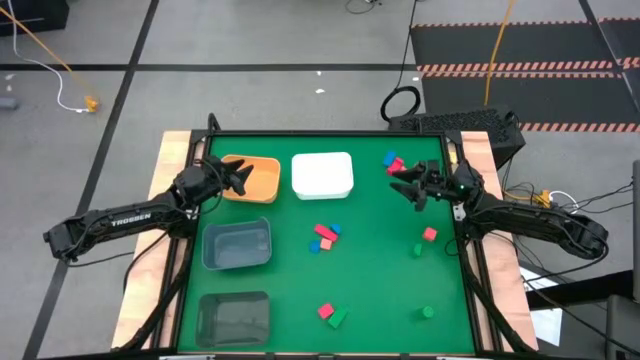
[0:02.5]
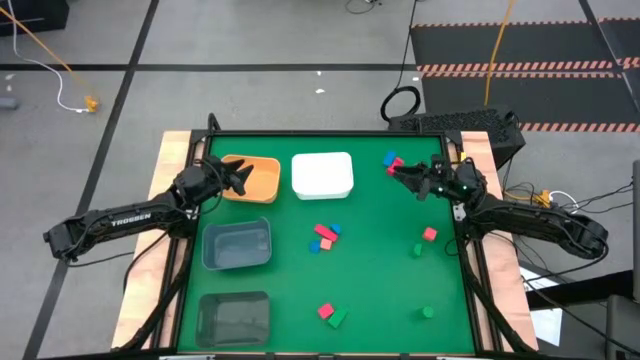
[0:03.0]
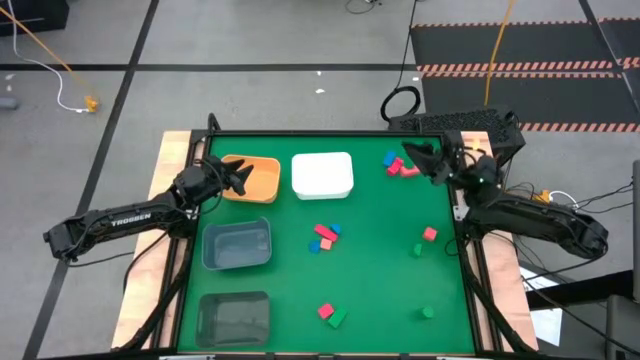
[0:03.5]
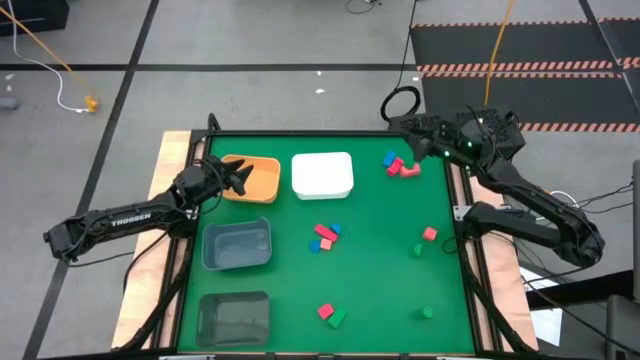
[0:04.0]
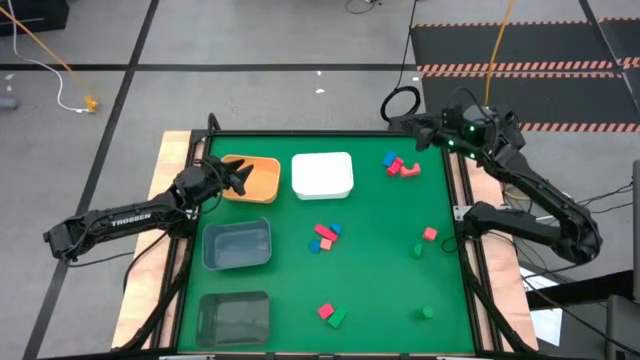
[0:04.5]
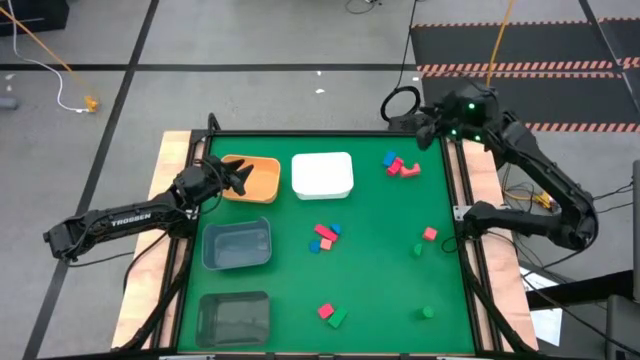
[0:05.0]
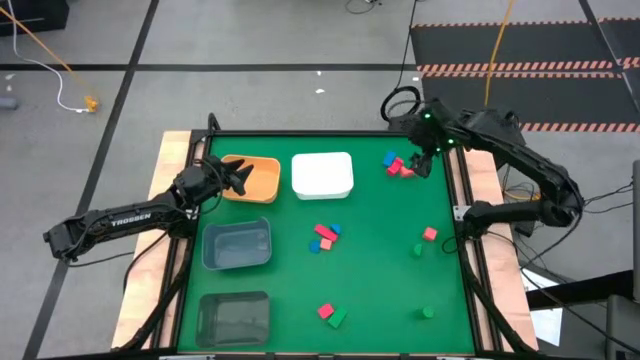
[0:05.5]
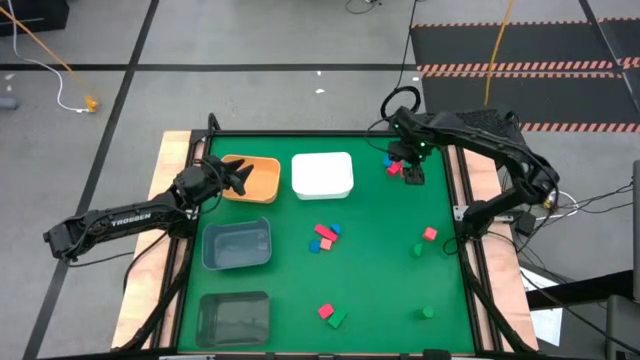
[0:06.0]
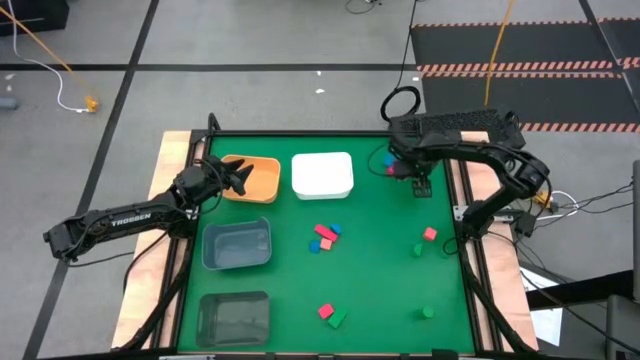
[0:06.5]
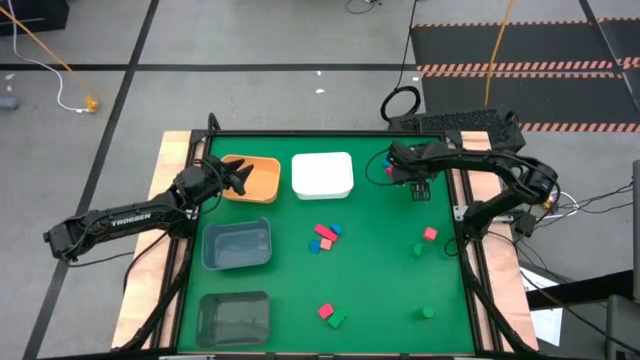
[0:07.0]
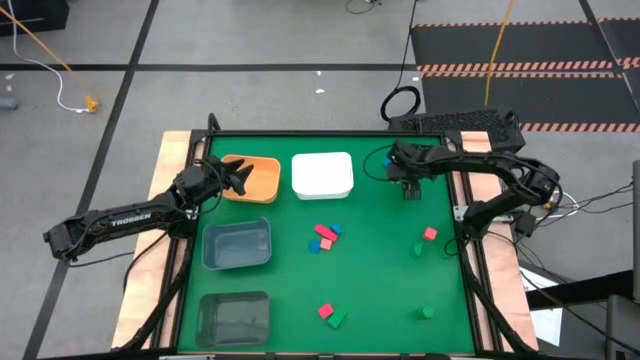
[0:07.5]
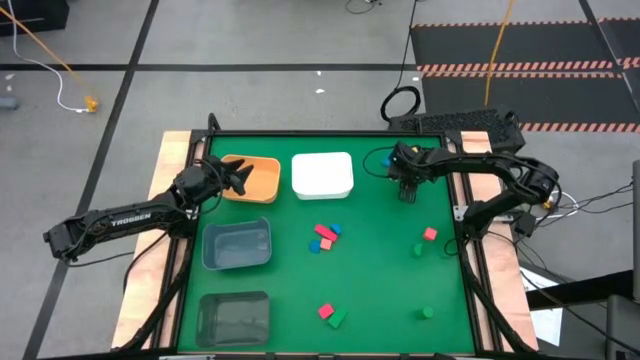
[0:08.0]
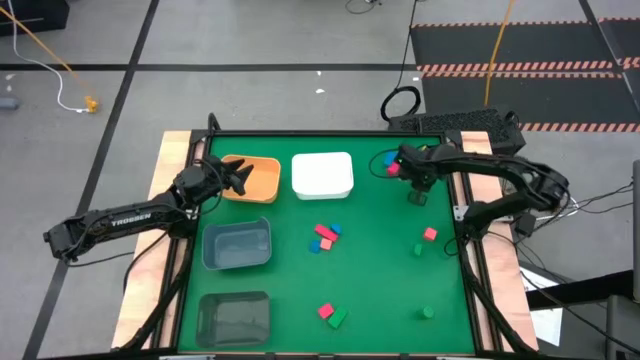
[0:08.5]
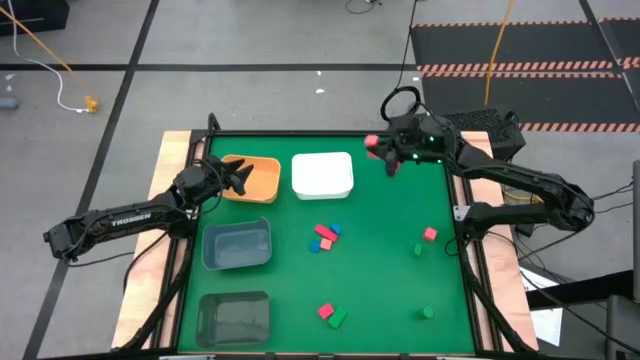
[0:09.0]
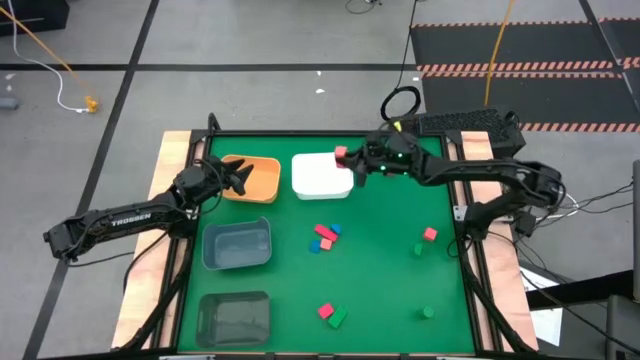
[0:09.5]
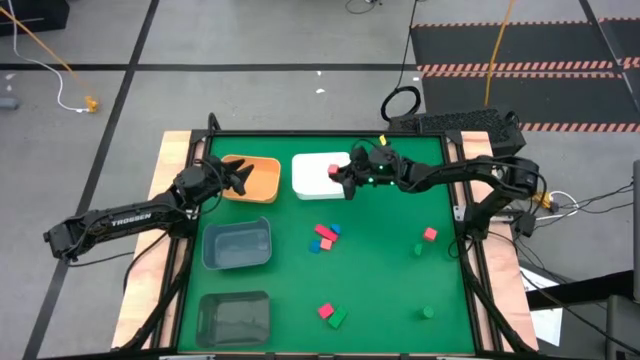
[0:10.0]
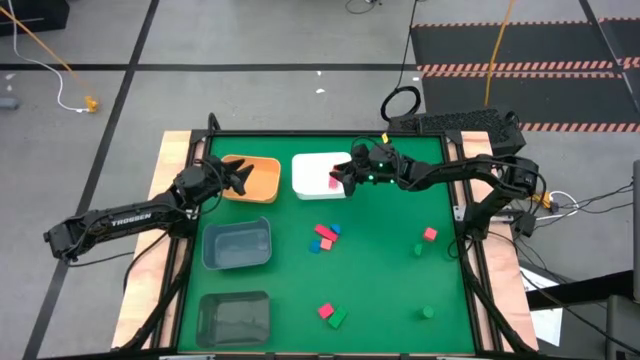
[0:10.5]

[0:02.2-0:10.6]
Task: Sort & place blocks by color
Put the top right pink block into the white bin

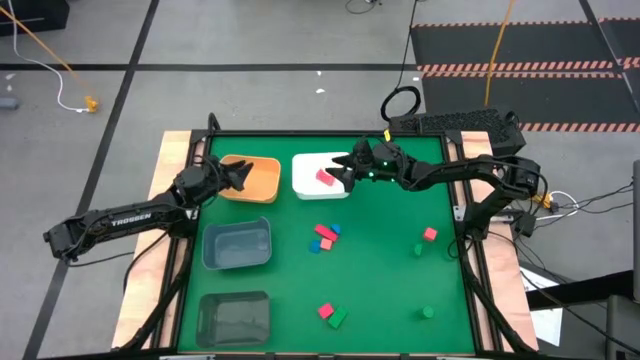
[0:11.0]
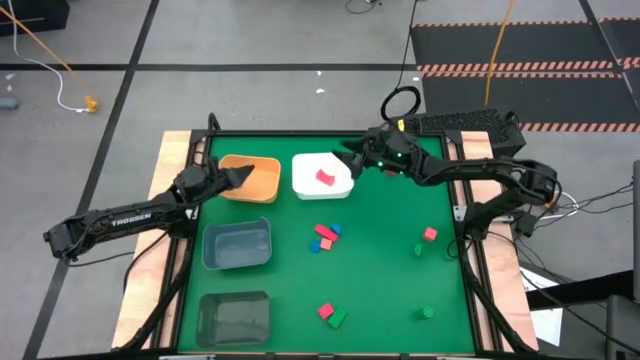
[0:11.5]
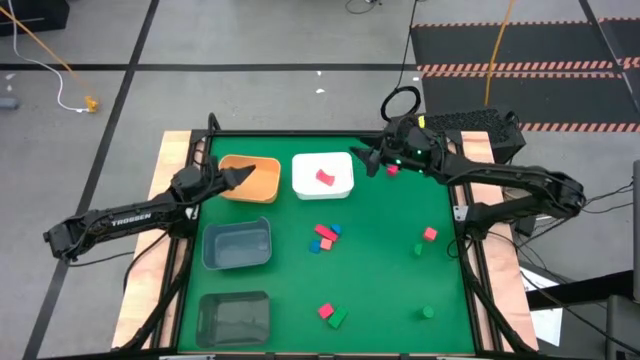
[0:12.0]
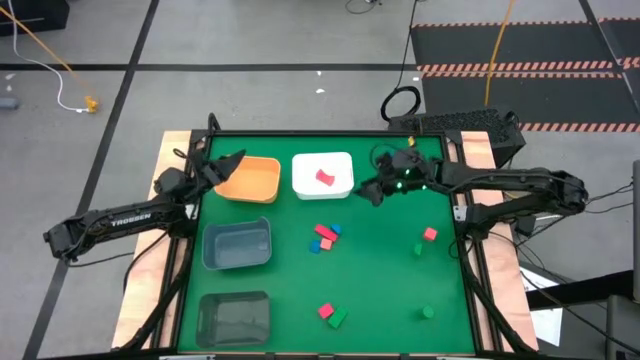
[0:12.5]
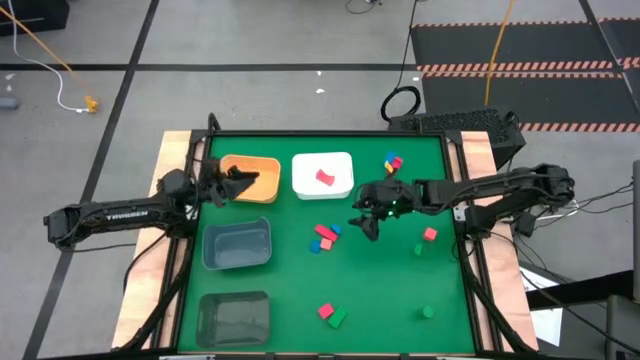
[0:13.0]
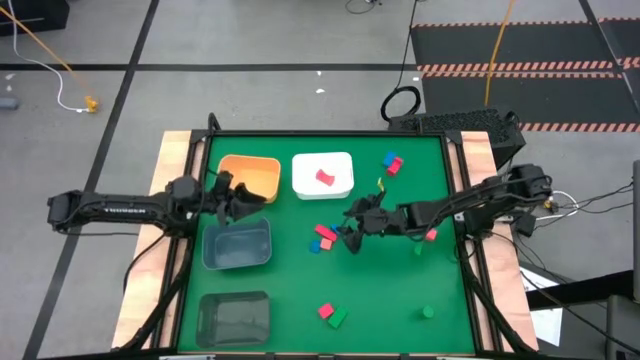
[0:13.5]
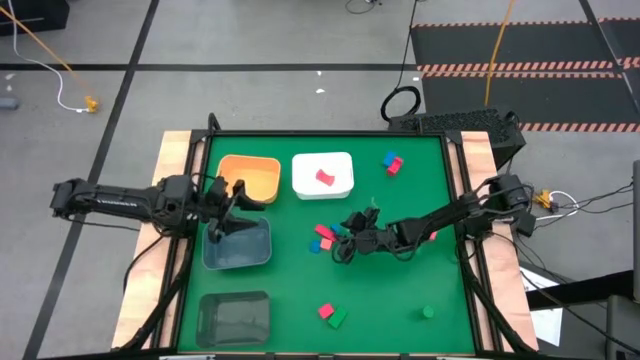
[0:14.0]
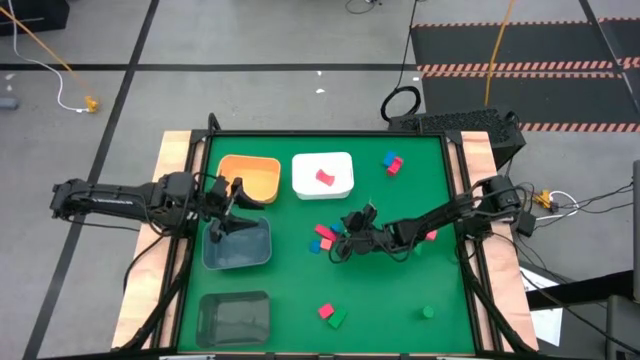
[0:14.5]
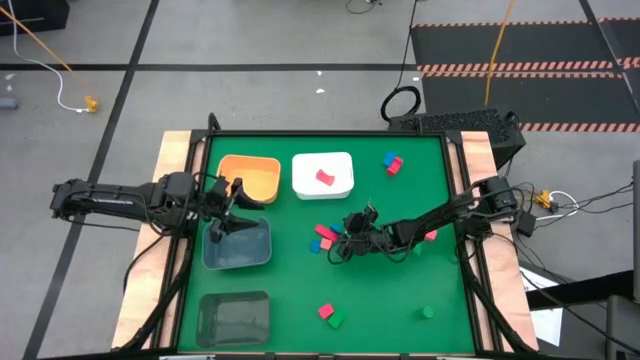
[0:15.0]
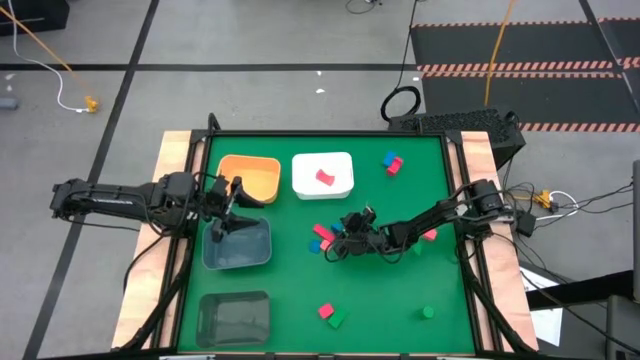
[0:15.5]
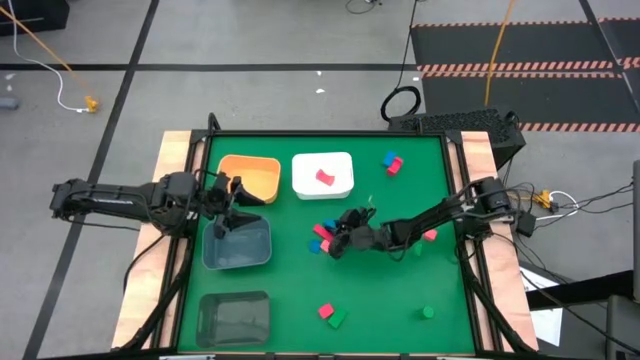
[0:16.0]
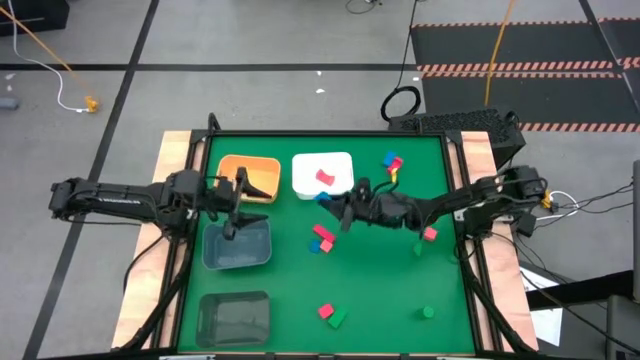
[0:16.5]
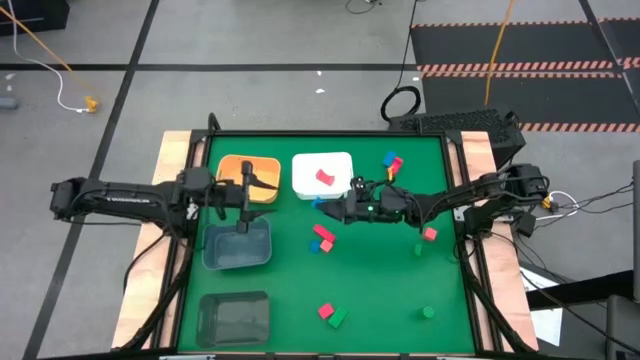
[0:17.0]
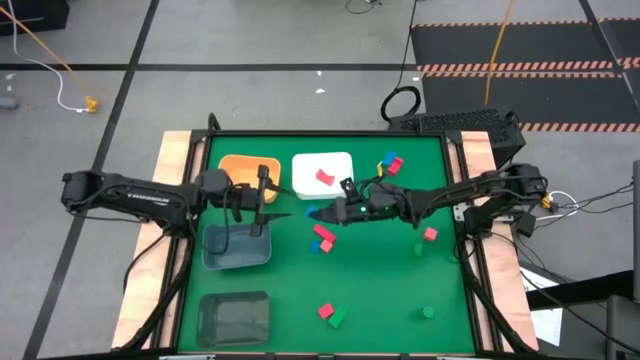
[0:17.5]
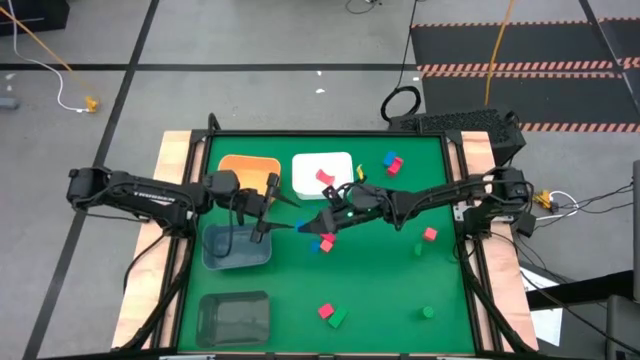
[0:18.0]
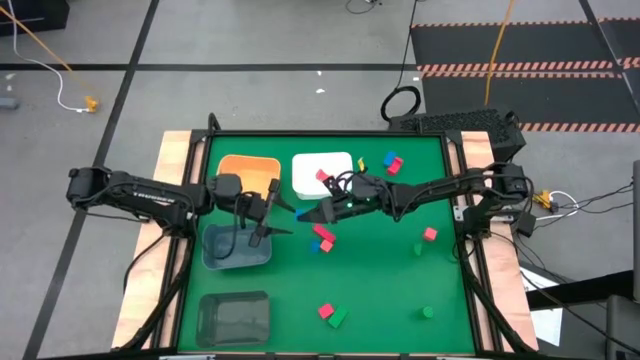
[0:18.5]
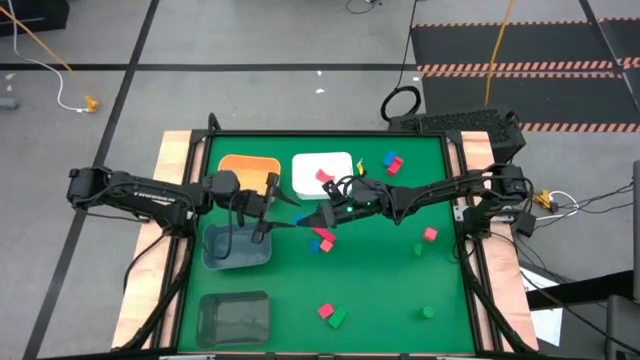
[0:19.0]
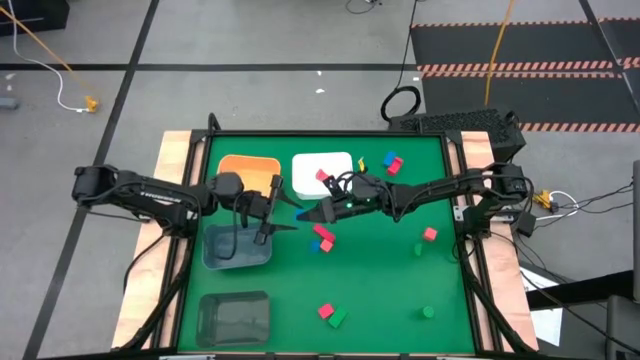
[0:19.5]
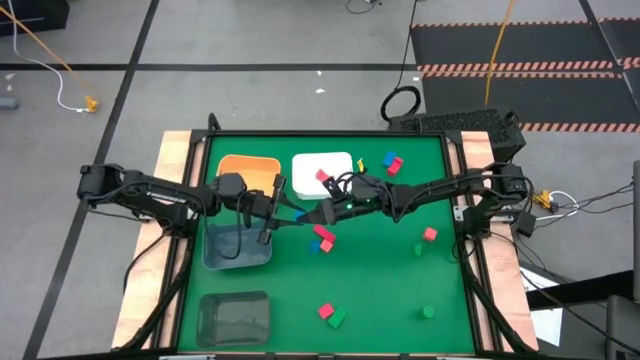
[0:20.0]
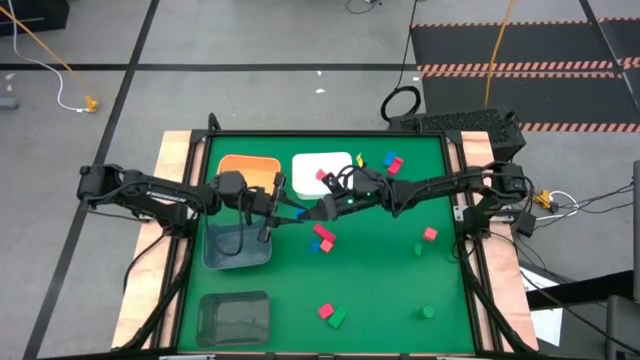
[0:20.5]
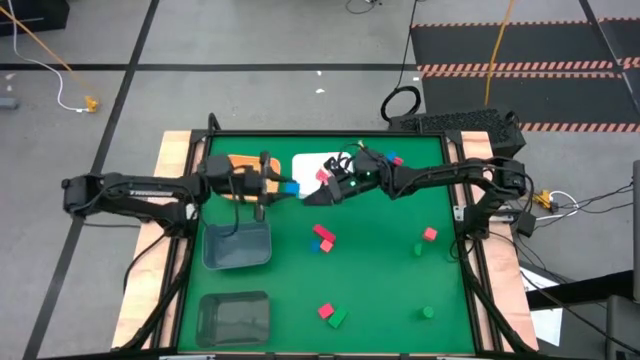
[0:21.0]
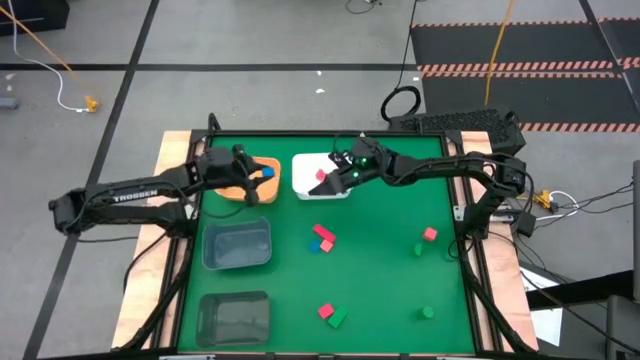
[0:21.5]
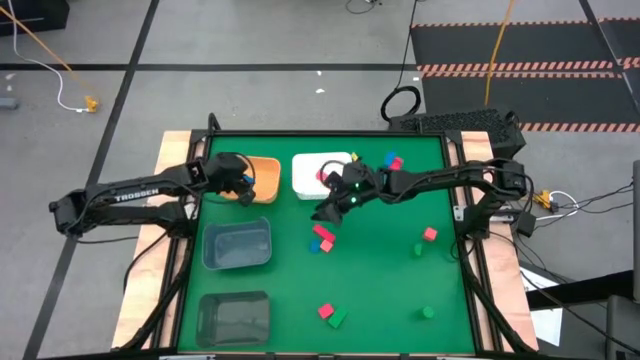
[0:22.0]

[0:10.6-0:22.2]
Put the bottom left blue block into the yellow bin
